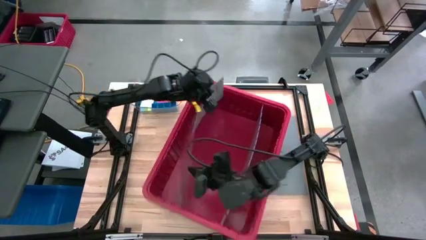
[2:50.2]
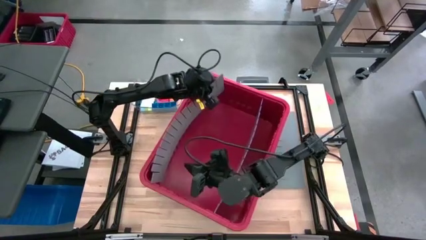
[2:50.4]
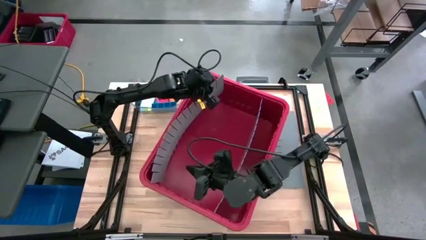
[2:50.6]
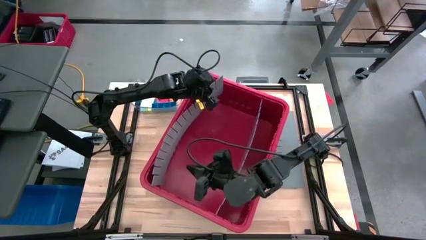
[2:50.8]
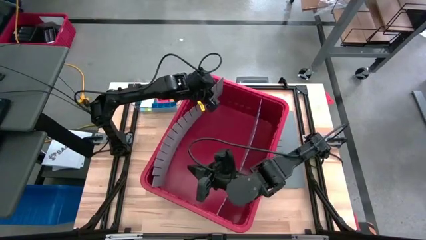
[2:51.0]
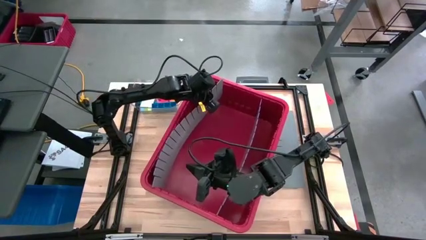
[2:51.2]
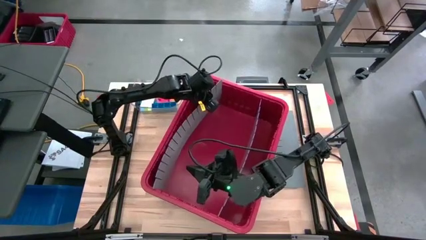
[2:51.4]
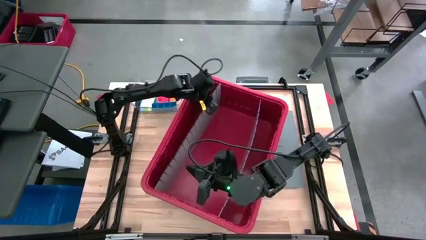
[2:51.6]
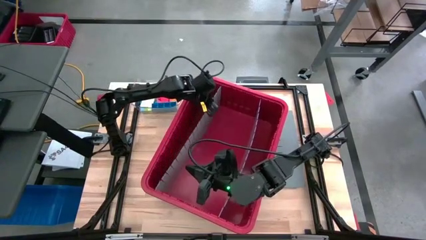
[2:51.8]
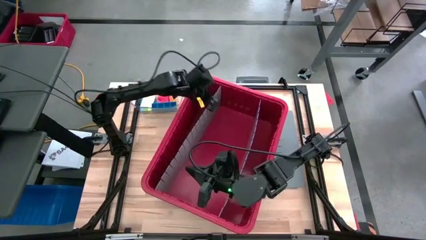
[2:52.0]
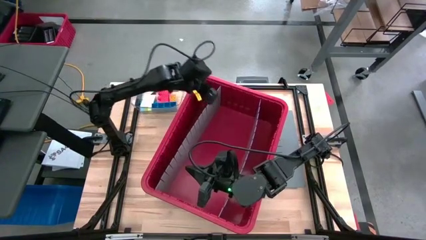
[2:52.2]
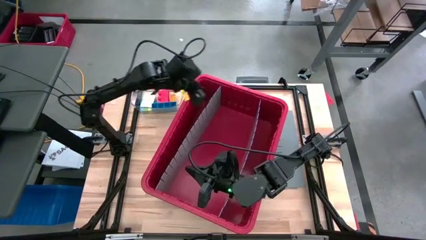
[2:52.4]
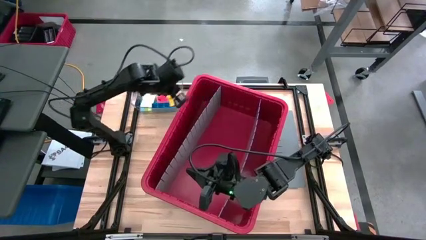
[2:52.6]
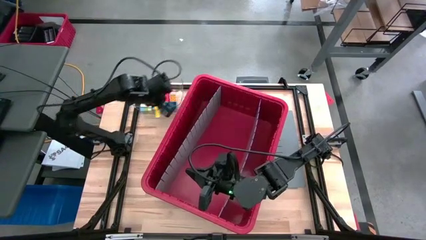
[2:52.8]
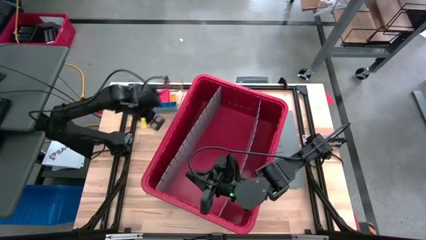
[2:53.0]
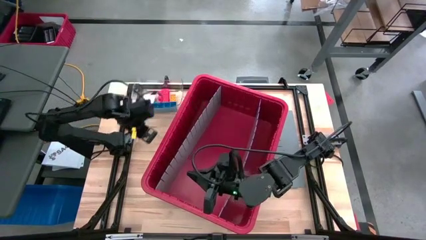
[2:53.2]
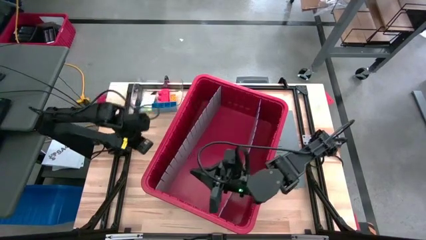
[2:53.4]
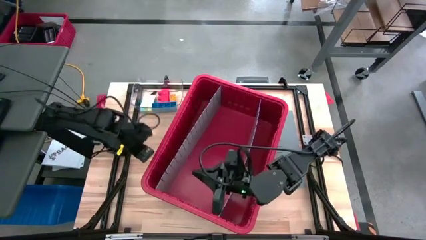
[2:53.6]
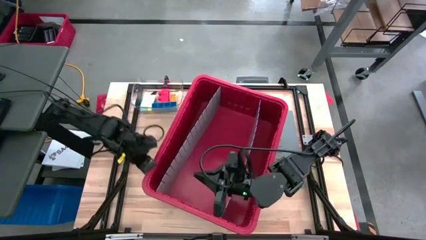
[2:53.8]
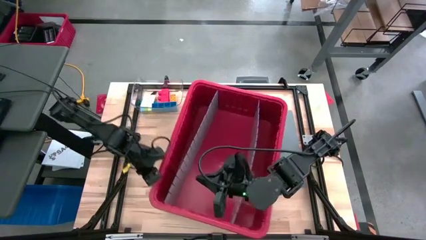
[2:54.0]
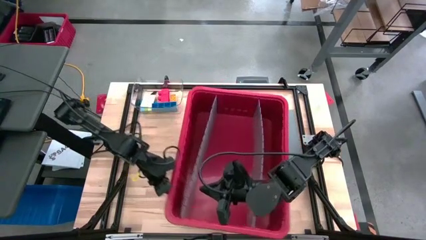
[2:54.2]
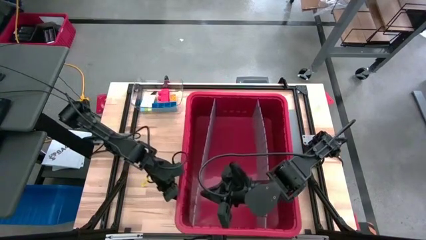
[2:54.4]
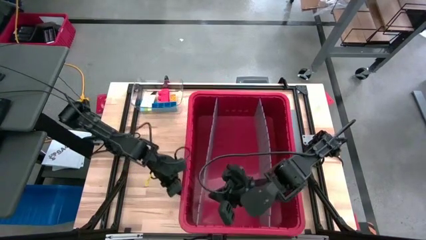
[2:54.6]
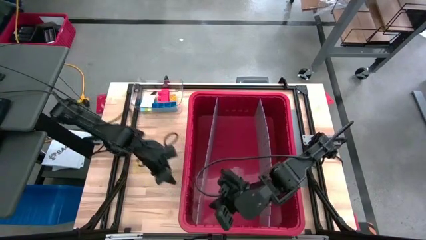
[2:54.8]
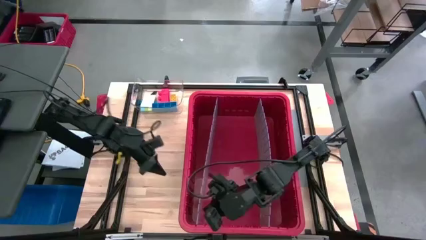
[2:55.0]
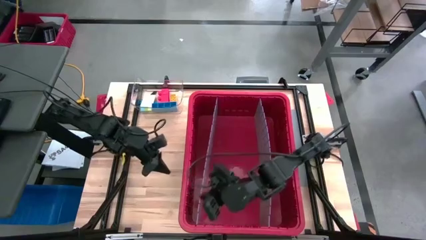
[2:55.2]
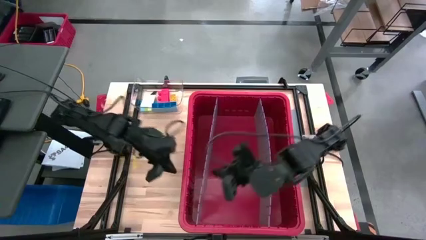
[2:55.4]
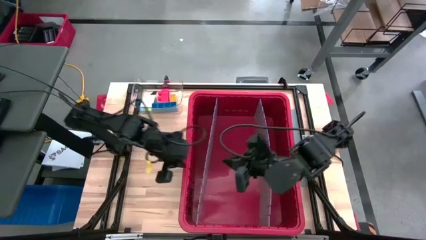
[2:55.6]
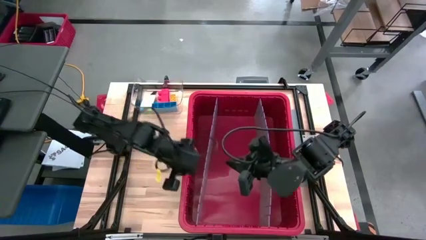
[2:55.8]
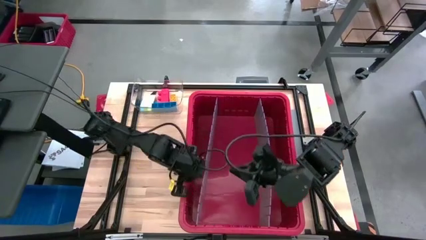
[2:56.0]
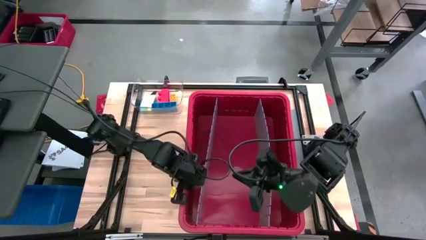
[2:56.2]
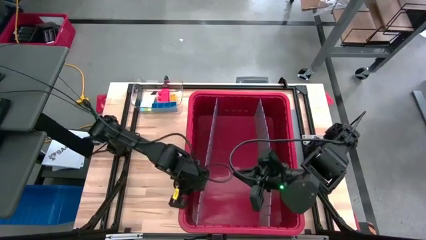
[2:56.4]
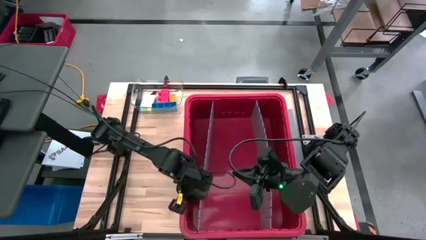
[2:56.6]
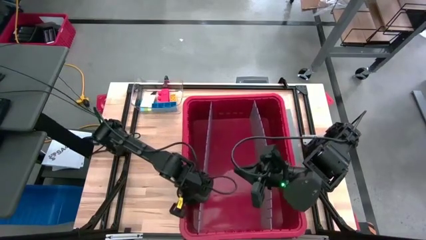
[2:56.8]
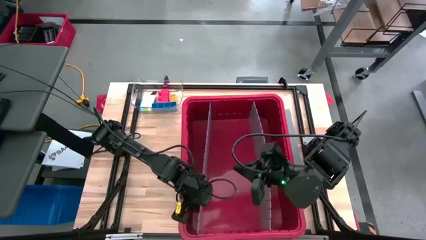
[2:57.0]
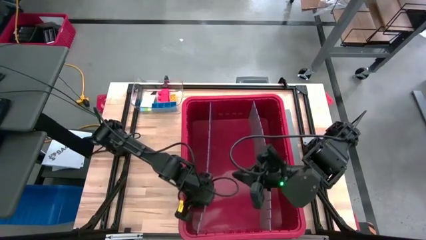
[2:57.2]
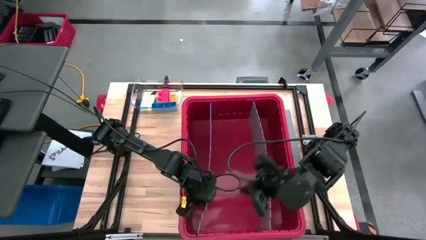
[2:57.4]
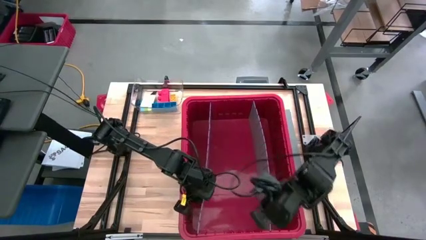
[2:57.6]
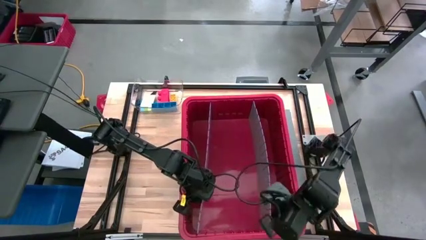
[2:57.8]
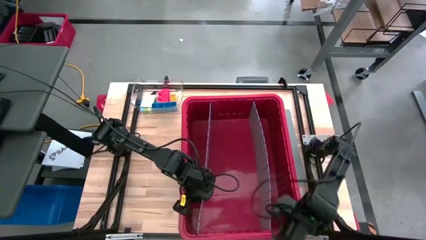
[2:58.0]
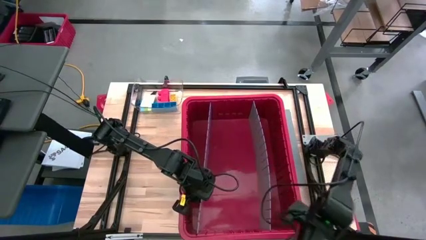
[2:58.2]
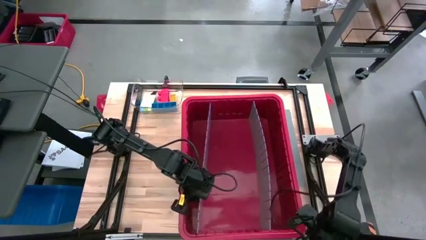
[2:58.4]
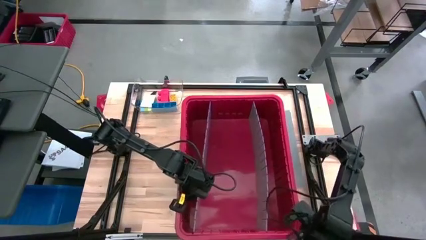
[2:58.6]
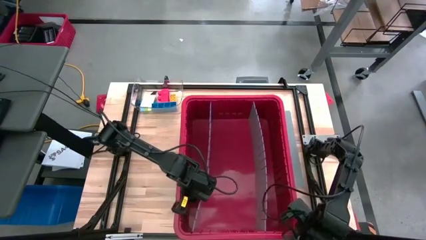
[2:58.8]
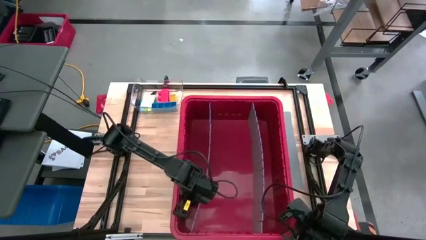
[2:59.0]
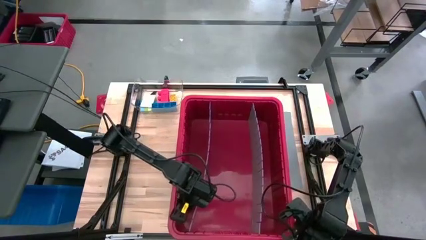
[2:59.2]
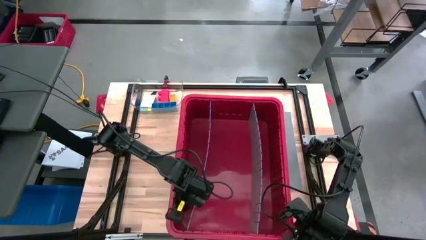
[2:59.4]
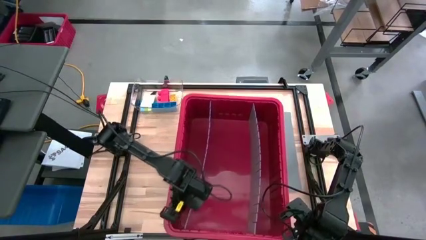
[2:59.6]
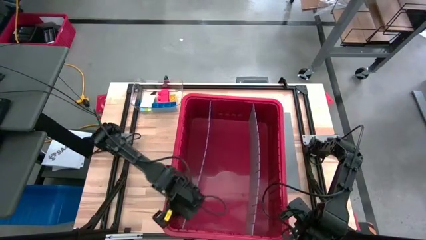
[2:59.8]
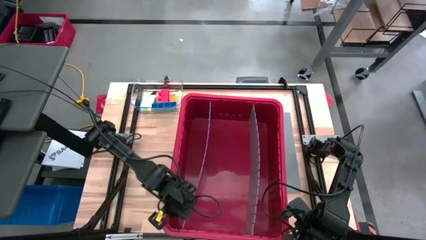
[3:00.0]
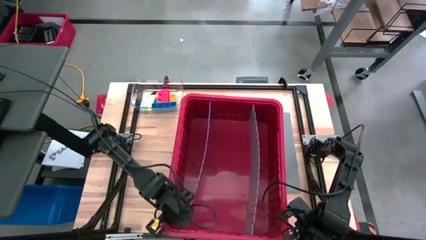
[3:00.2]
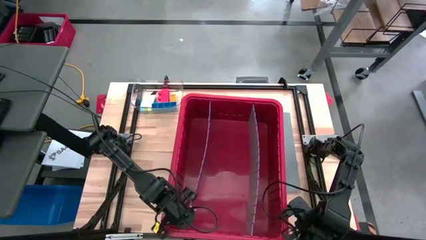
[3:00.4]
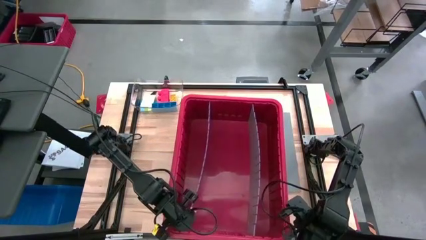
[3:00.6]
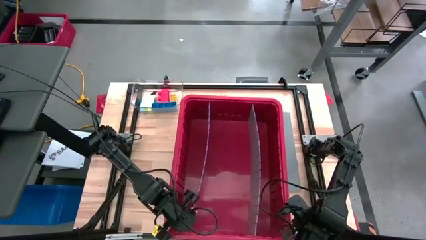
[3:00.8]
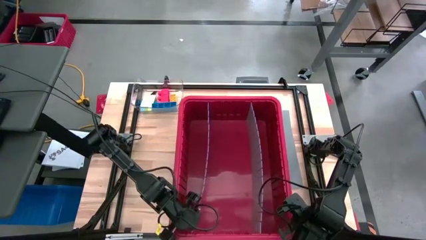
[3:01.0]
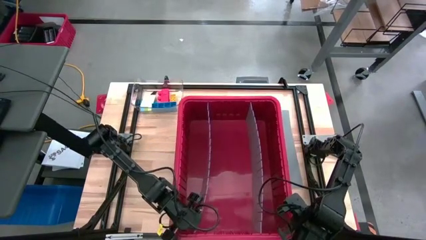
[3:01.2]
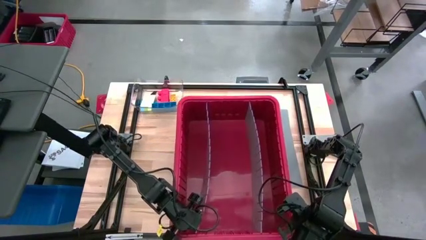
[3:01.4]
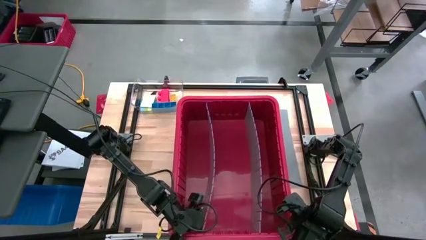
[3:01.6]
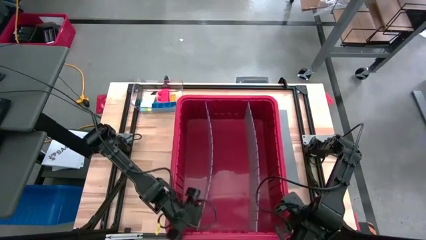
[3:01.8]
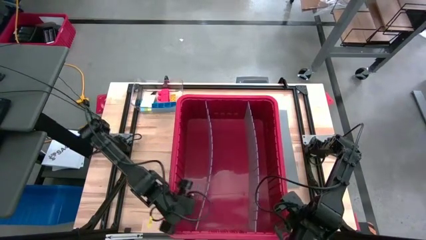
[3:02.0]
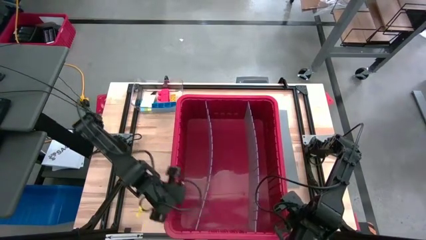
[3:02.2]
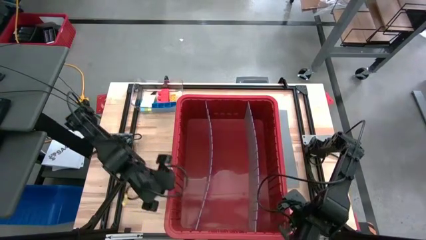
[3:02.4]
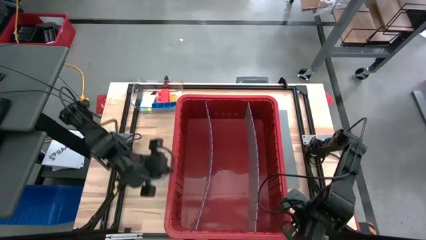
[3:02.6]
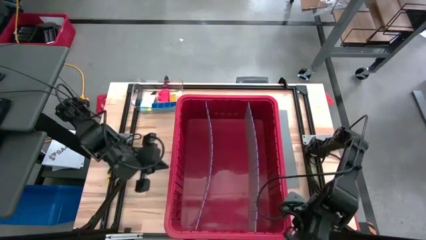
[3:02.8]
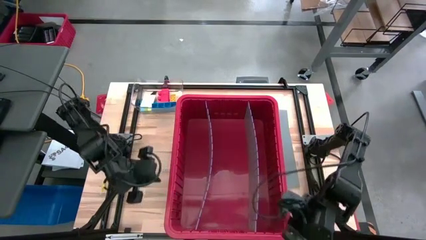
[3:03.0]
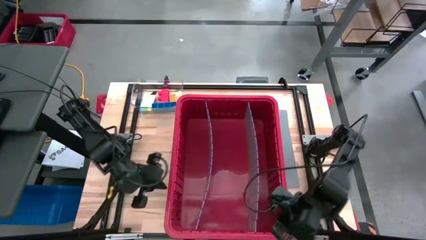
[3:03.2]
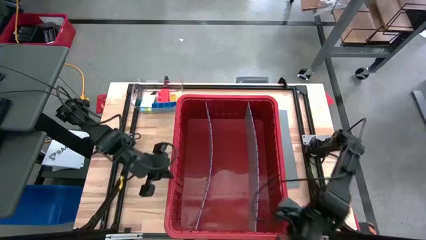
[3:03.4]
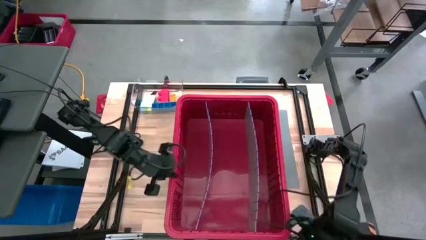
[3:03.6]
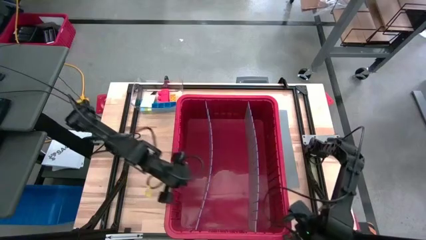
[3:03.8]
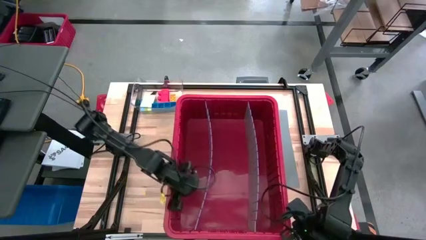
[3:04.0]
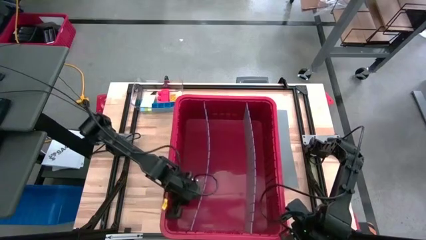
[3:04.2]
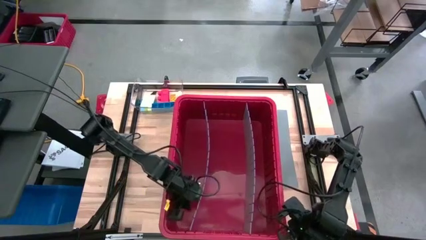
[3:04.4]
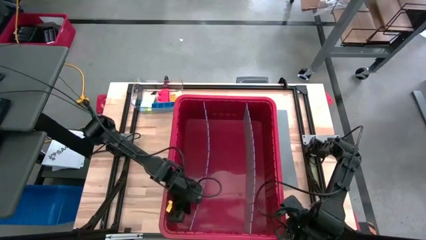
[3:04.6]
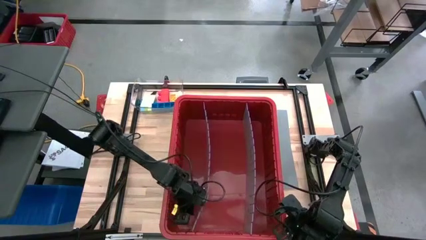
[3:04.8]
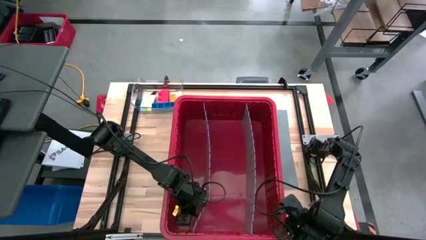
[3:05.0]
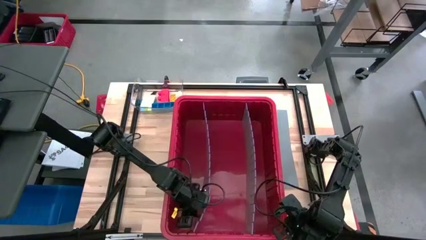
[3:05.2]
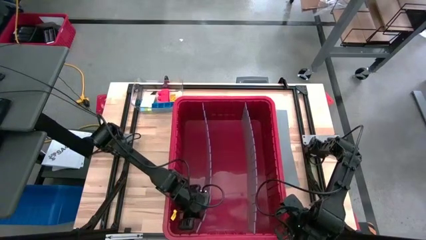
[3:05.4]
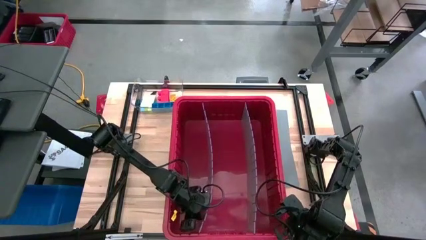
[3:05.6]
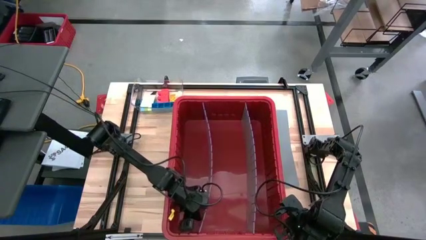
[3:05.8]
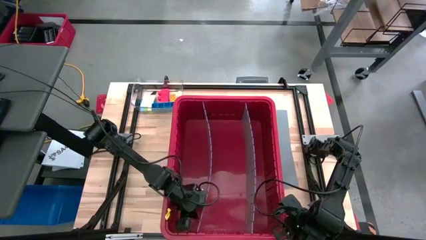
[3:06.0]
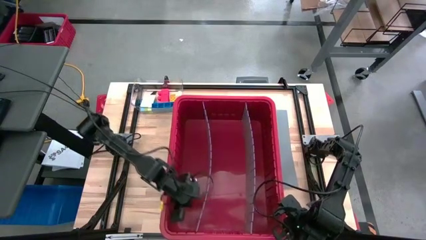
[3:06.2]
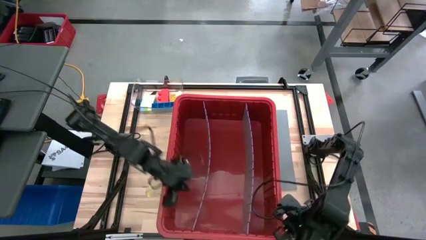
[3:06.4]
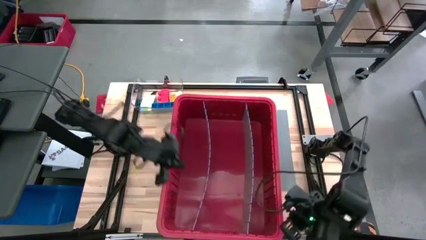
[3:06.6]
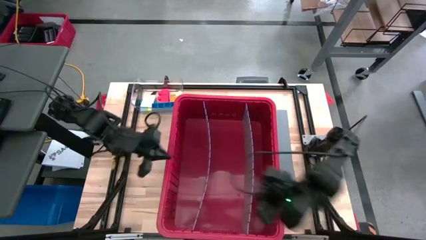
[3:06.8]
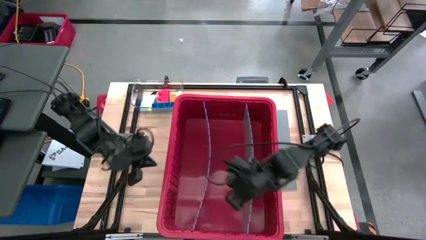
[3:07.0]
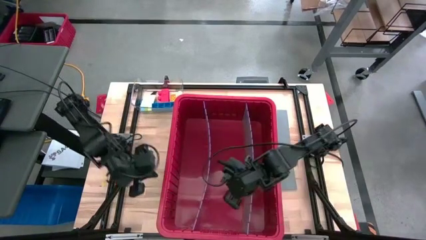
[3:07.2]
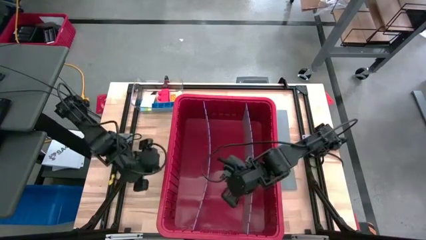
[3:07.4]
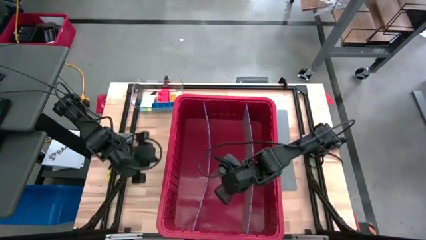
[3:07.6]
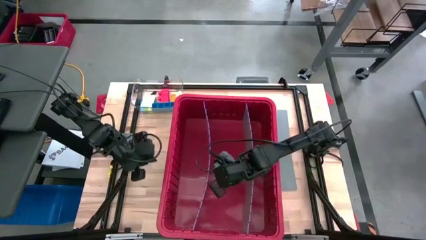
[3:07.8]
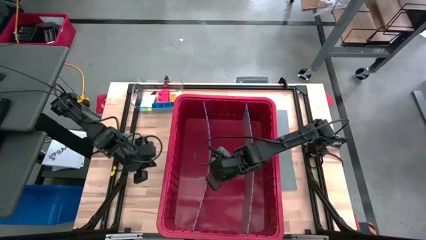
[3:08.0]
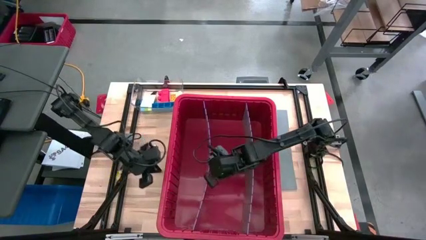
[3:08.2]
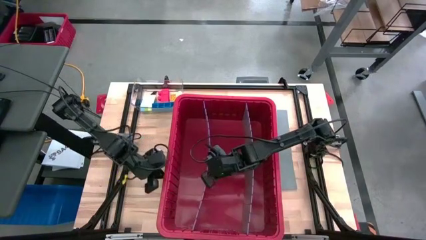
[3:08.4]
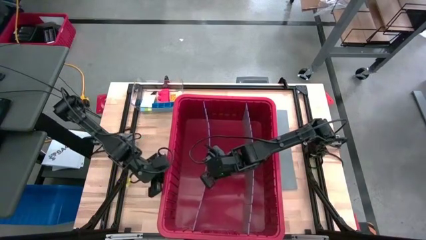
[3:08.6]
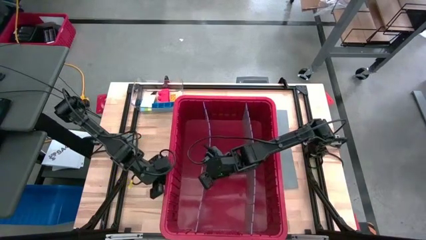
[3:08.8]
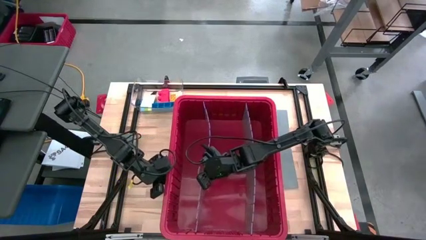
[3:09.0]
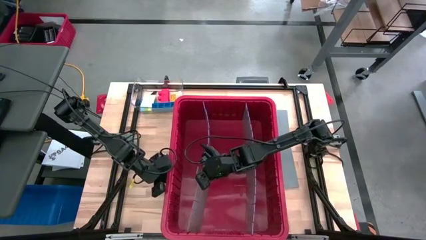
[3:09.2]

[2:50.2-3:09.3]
Task: Sort blocks
Assemble the bin divider into the red bin
